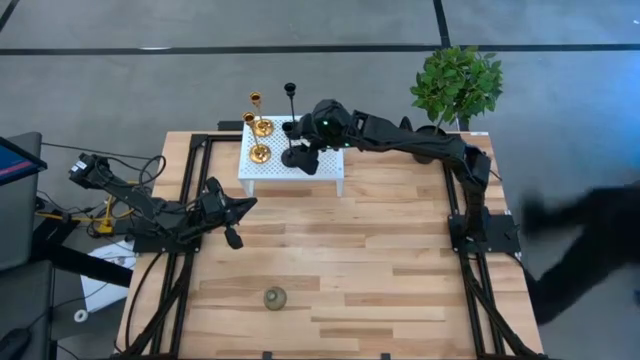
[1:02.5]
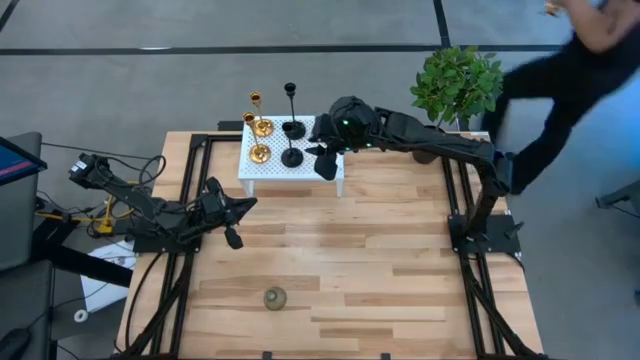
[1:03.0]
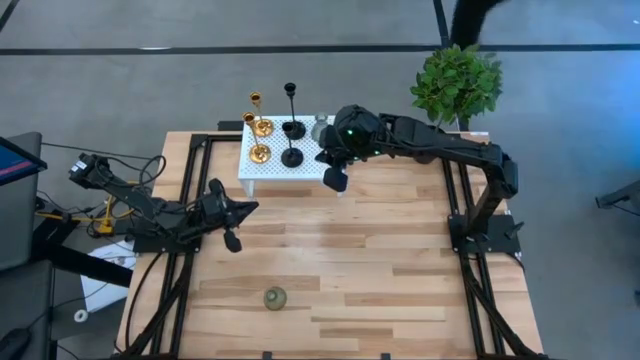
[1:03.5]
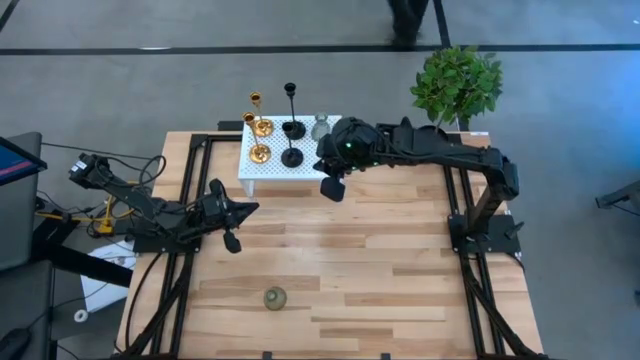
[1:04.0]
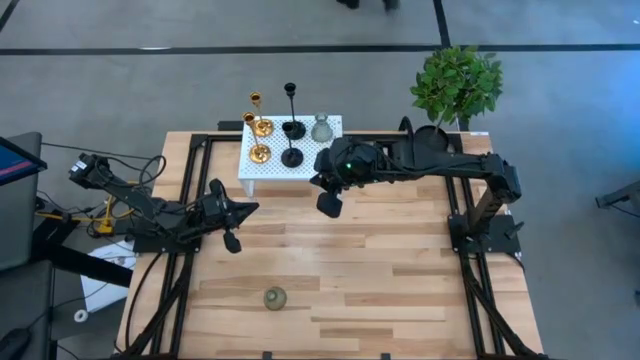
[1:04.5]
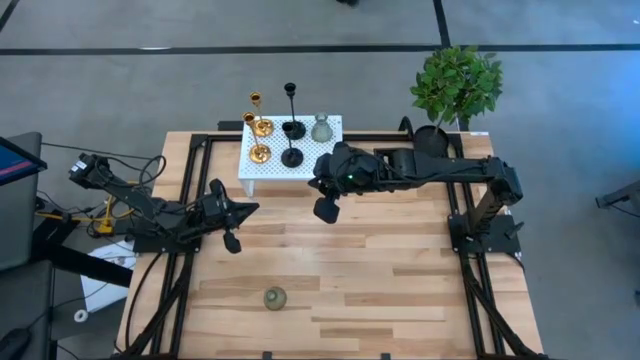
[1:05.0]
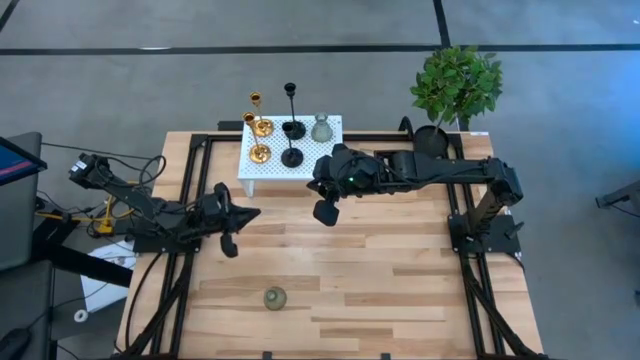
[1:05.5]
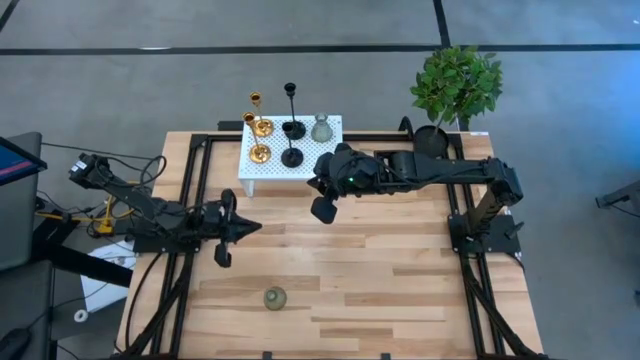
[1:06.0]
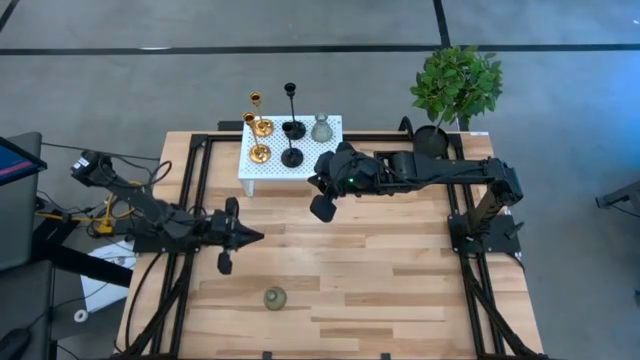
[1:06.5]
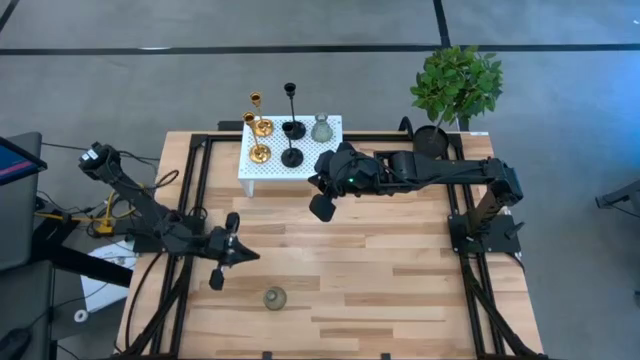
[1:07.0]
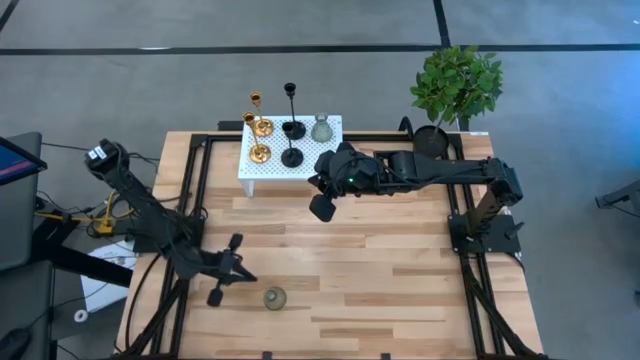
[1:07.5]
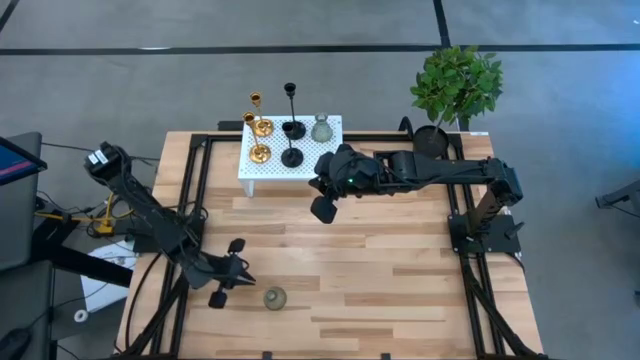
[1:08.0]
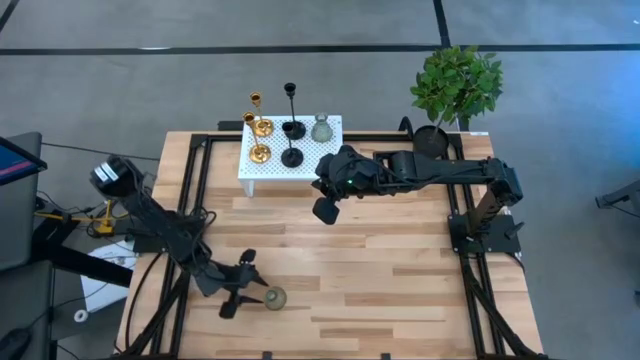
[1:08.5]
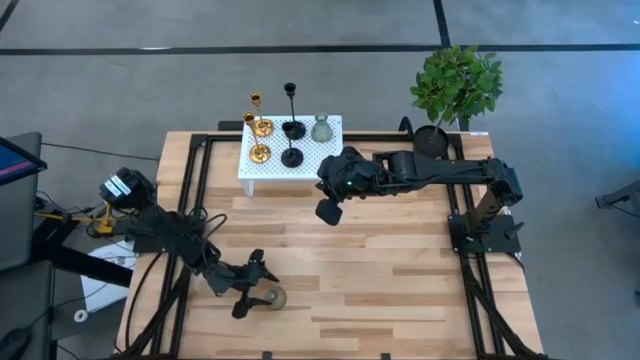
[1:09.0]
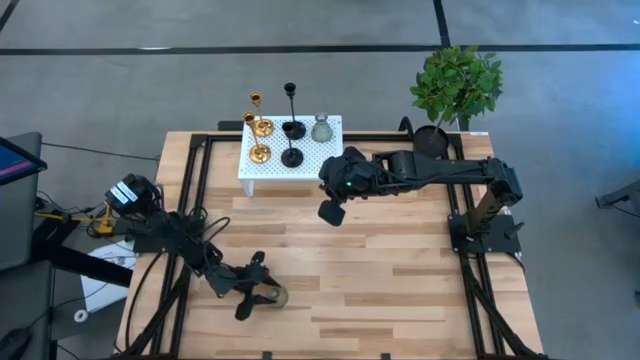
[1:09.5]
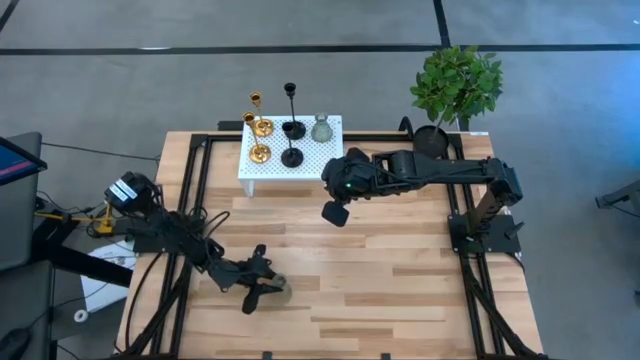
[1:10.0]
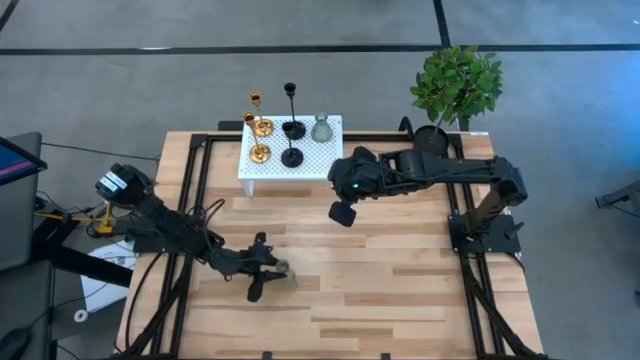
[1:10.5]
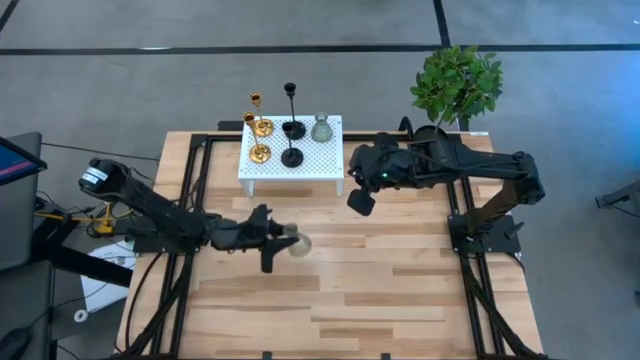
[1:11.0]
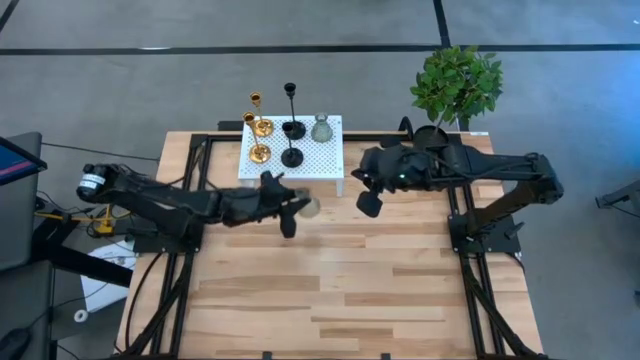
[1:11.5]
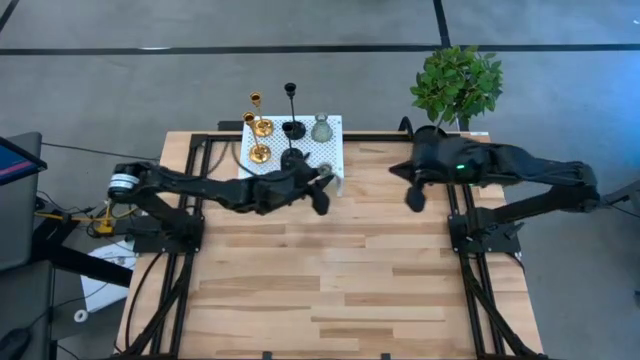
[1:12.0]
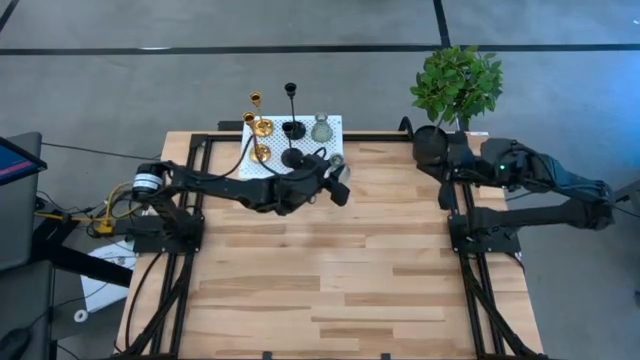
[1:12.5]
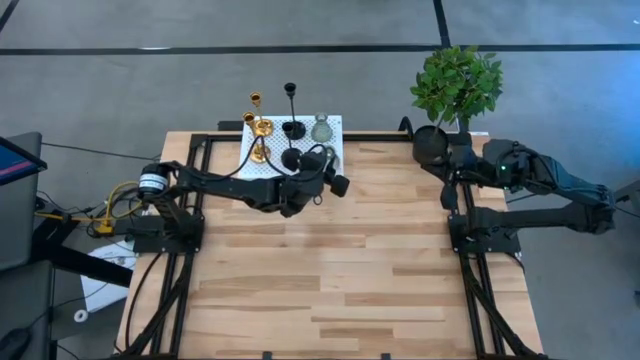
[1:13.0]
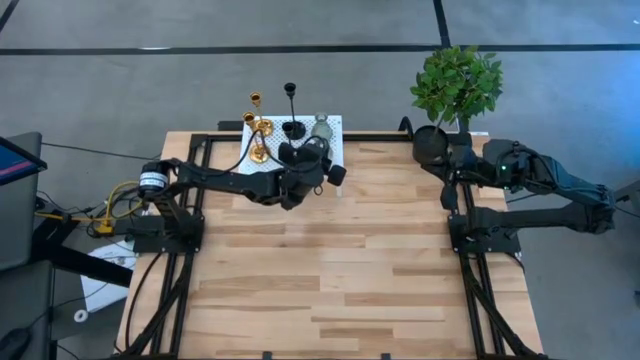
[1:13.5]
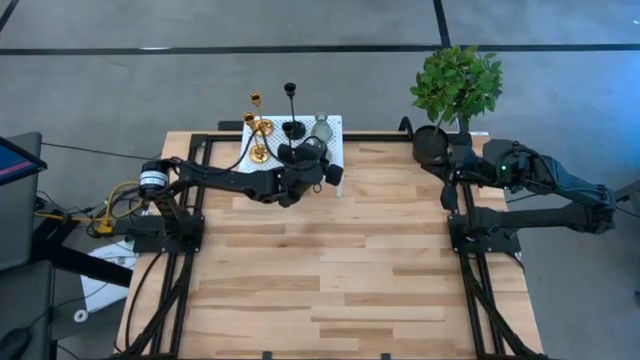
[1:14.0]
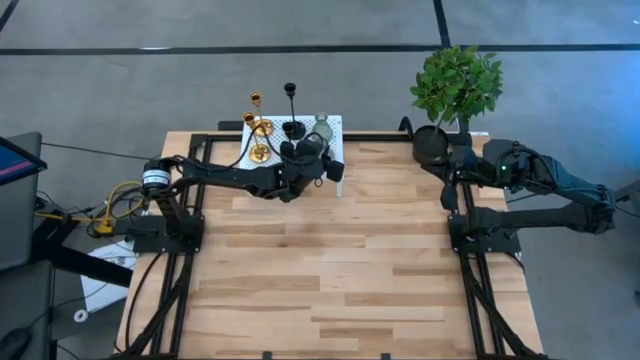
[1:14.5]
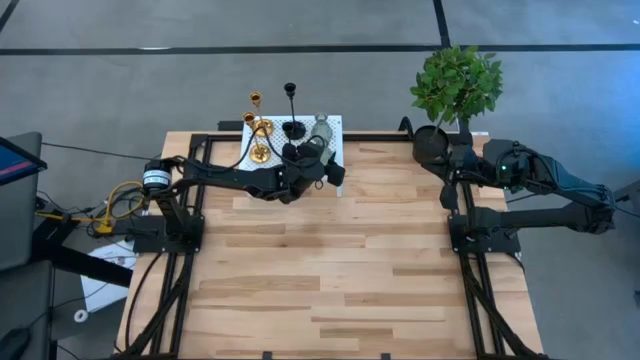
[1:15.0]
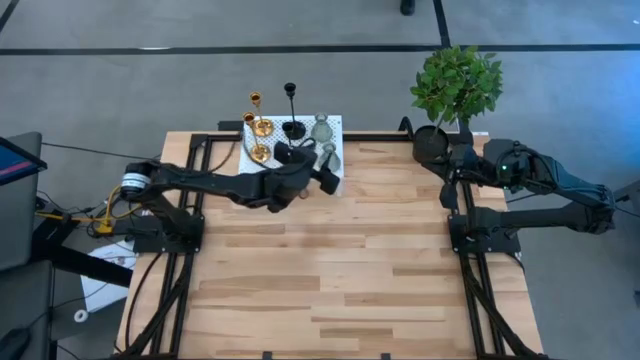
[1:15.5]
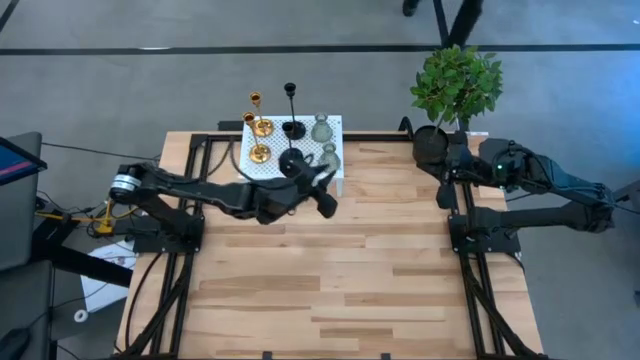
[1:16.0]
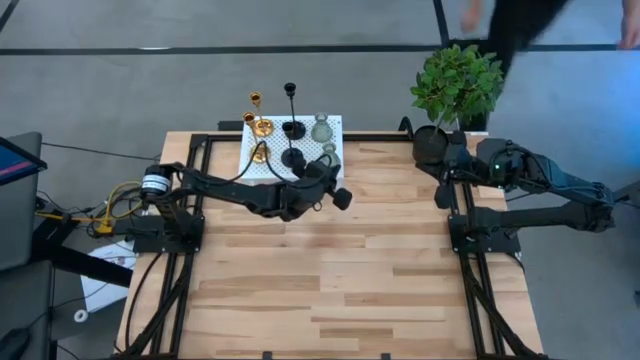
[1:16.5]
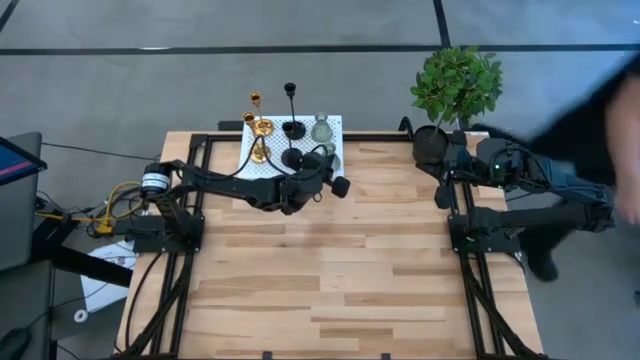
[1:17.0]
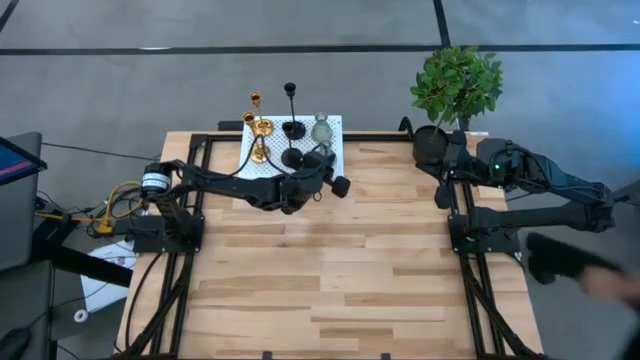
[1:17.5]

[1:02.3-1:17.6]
Task: Pick & Place candle stick holders
Put the transparent candle holder on the shelf aligned with the other transparent candle holder

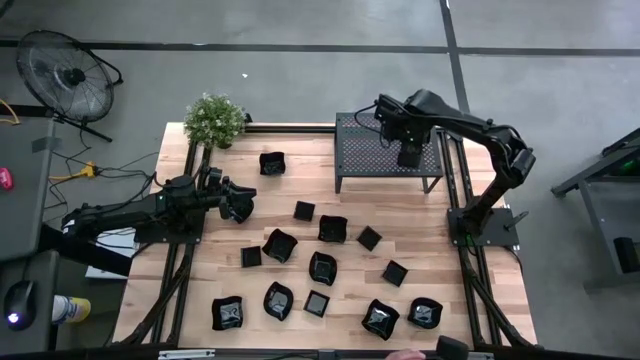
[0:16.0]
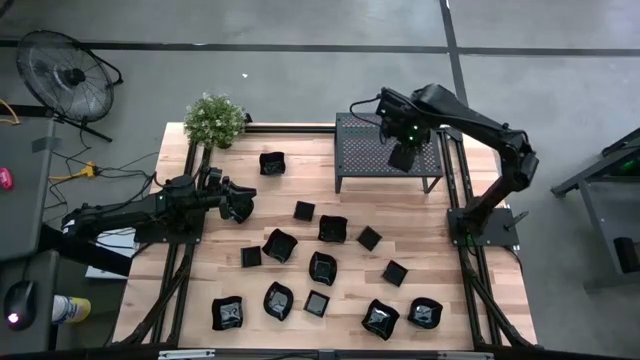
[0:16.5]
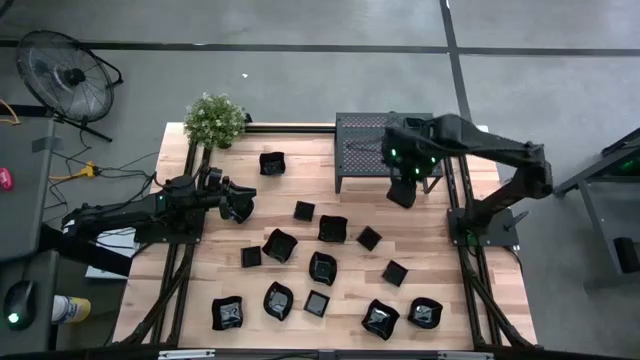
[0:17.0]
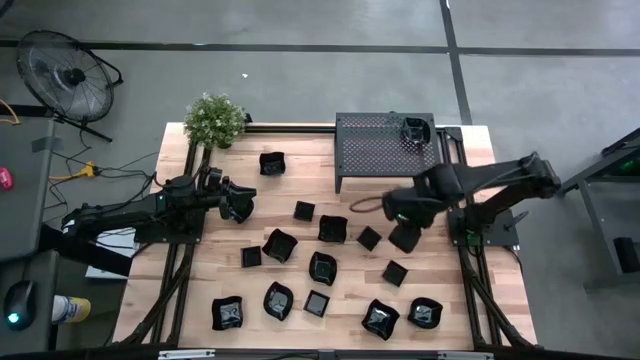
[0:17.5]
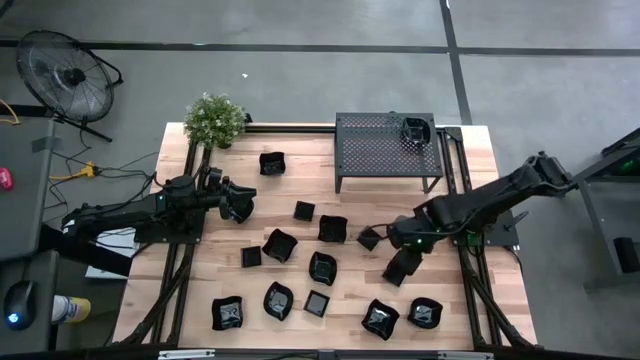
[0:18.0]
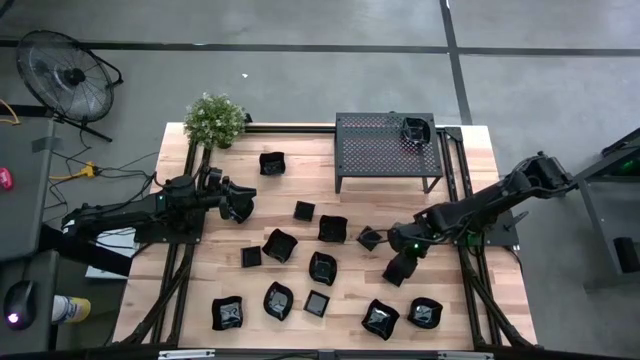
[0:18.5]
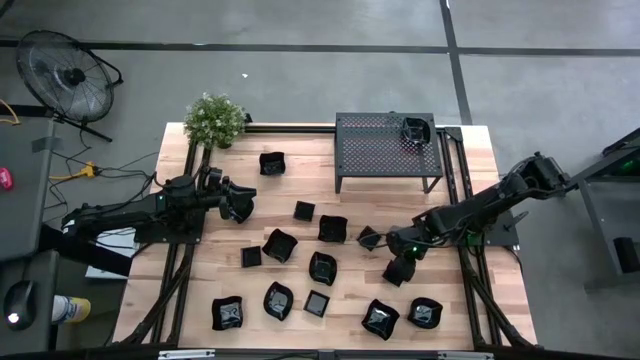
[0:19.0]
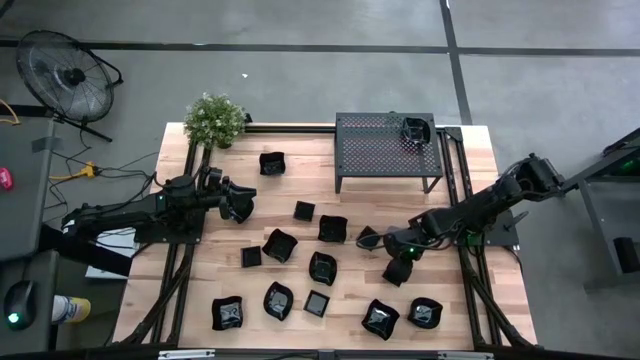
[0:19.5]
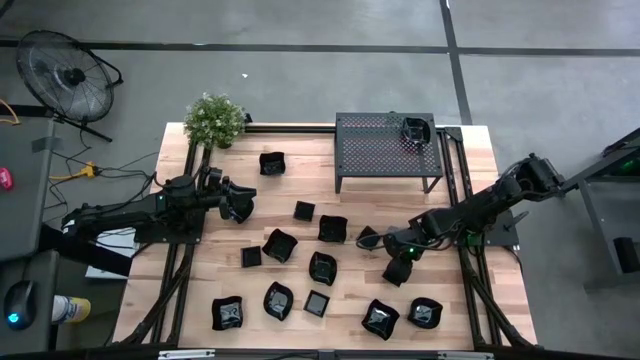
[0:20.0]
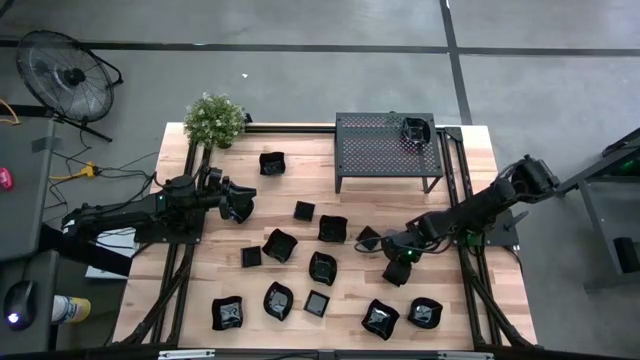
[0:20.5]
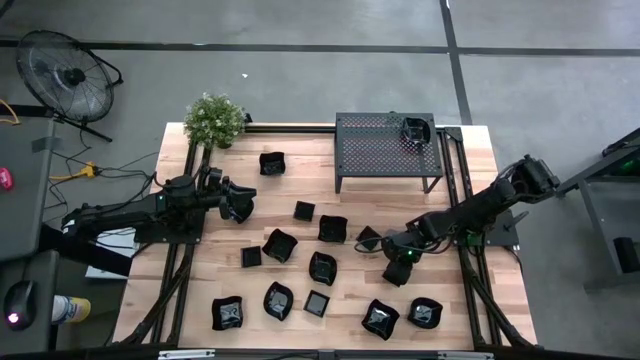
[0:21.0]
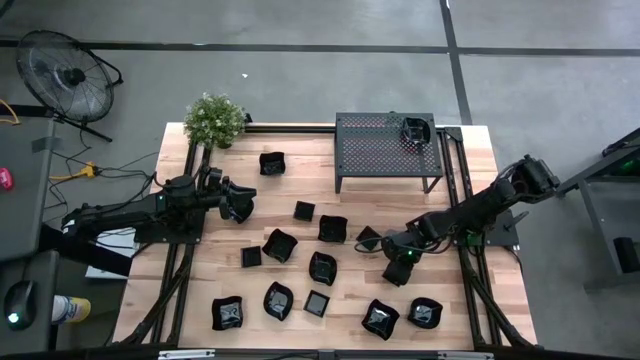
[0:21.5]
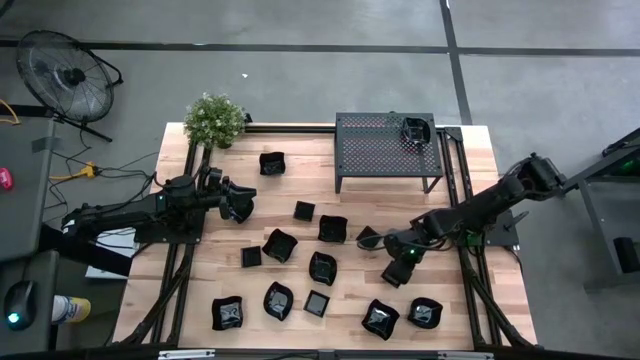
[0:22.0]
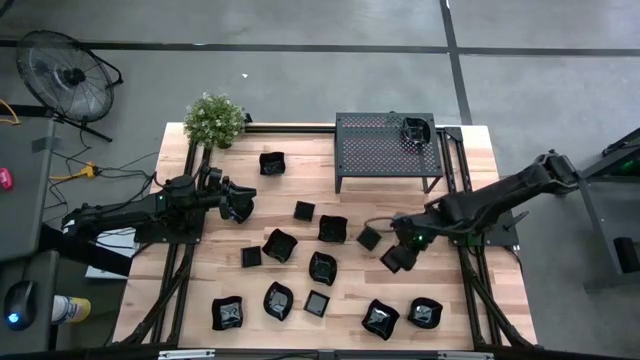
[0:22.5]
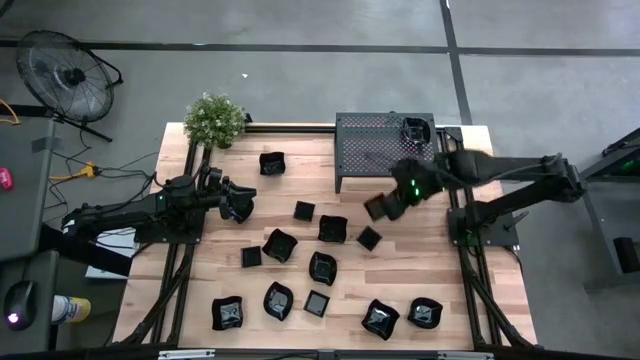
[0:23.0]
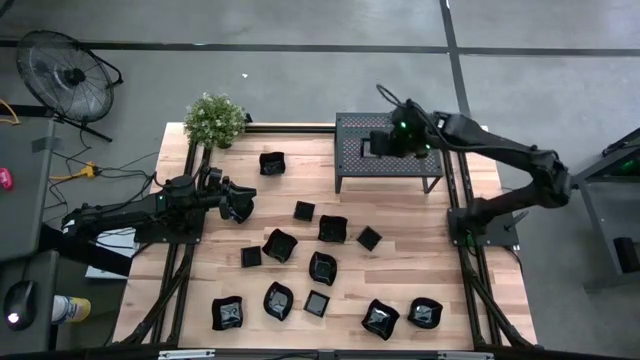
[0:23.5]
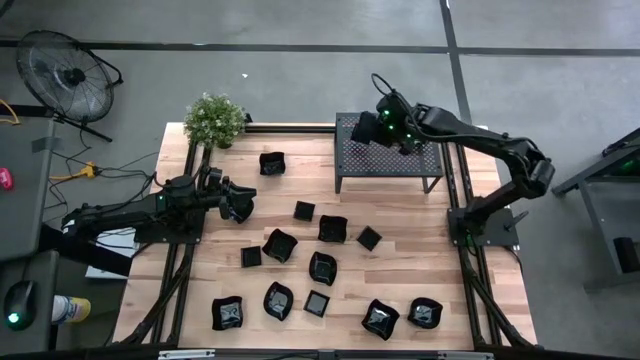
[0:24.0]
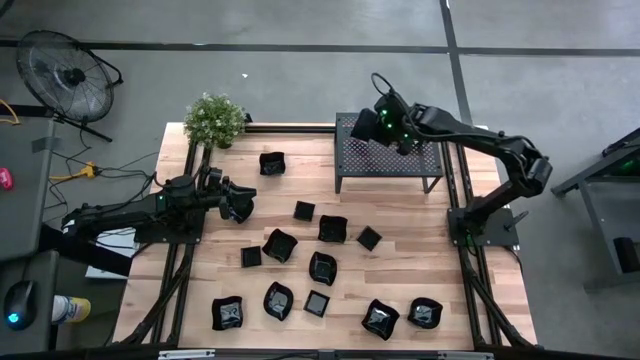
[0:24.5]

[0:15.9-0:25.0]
Task: Pick & Place Mini shaped plates
Put the black square plate on the shelf
